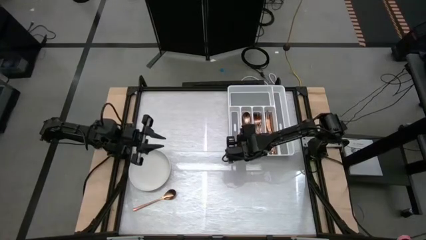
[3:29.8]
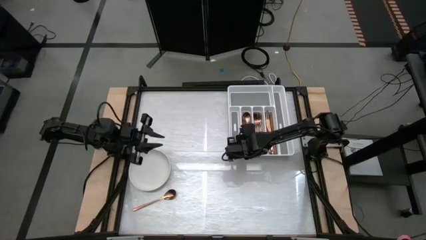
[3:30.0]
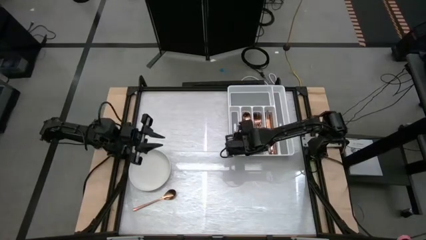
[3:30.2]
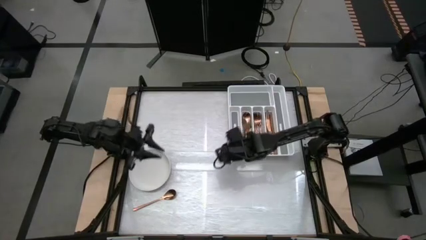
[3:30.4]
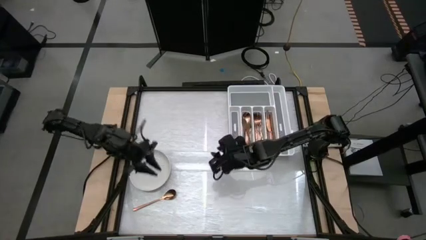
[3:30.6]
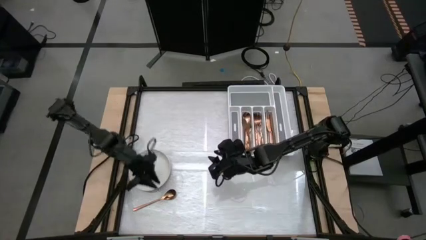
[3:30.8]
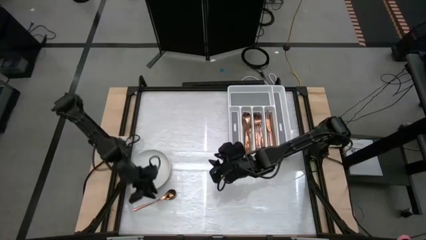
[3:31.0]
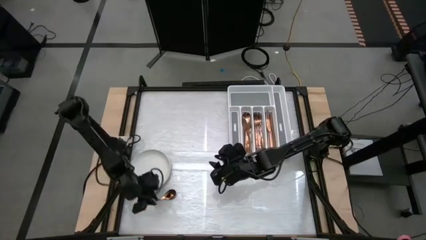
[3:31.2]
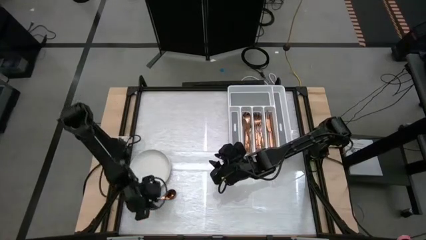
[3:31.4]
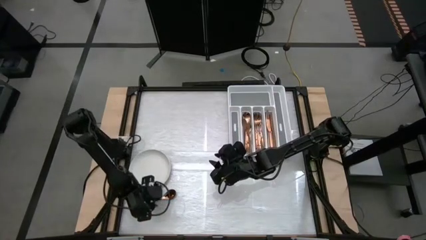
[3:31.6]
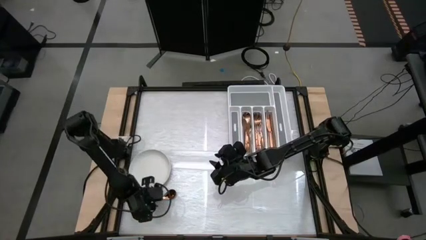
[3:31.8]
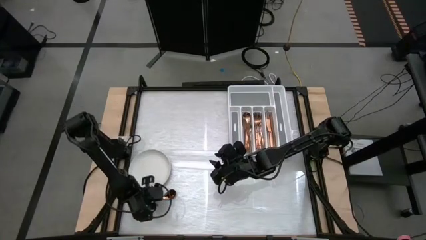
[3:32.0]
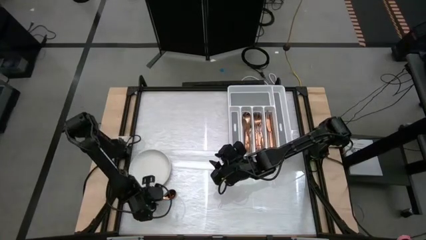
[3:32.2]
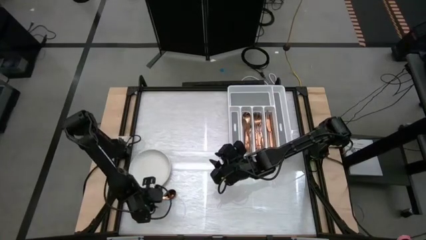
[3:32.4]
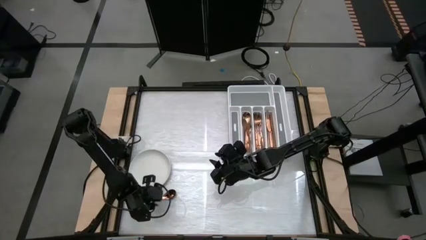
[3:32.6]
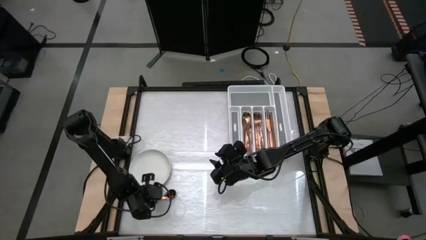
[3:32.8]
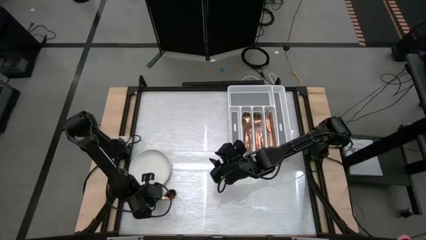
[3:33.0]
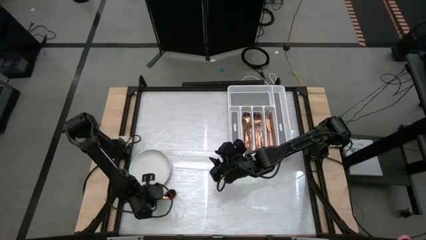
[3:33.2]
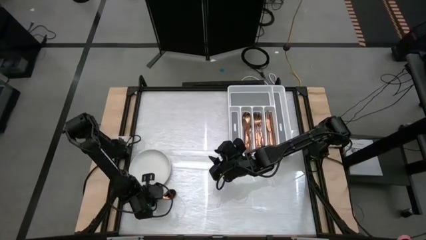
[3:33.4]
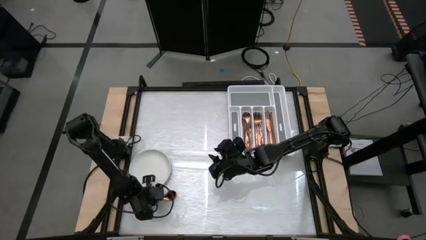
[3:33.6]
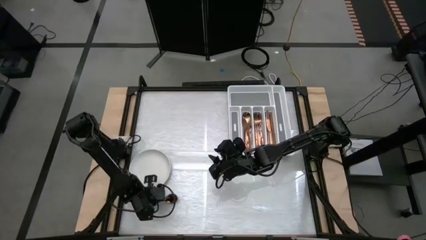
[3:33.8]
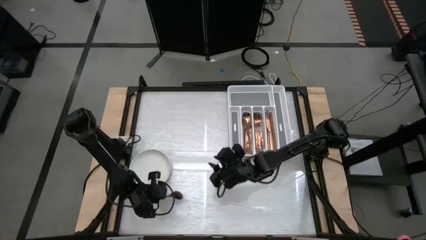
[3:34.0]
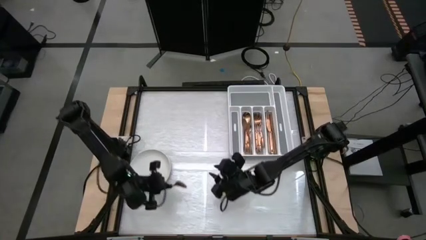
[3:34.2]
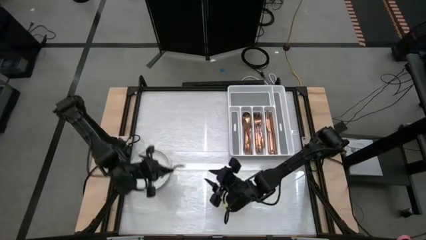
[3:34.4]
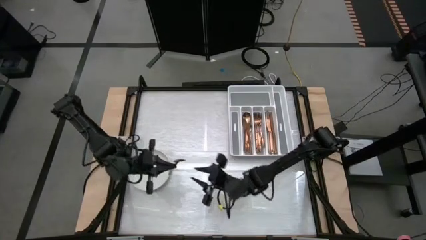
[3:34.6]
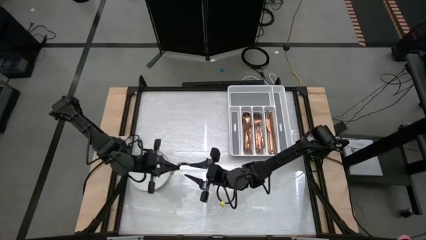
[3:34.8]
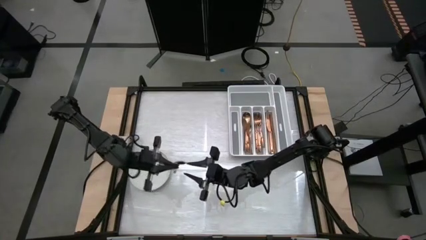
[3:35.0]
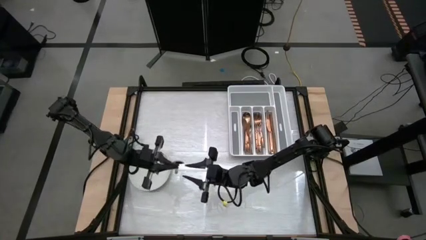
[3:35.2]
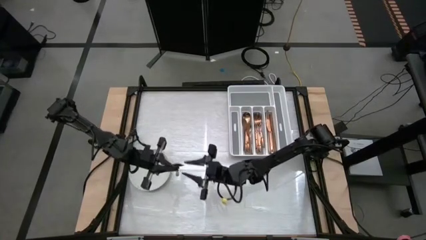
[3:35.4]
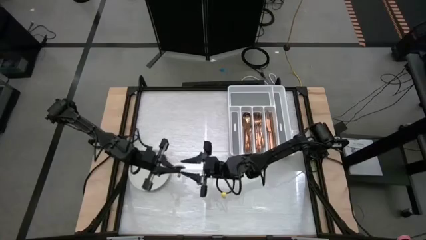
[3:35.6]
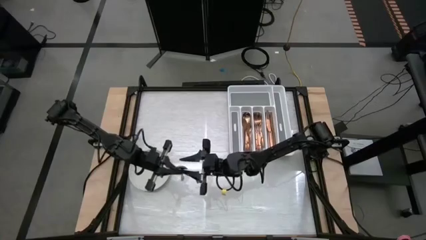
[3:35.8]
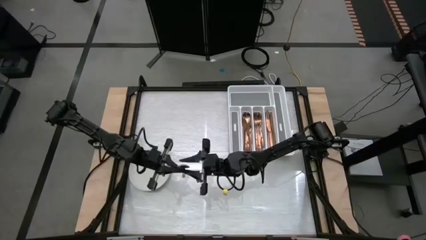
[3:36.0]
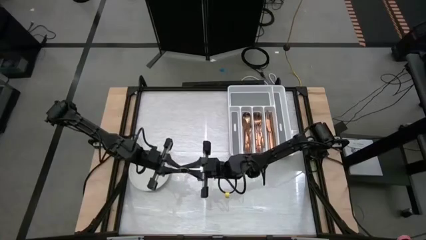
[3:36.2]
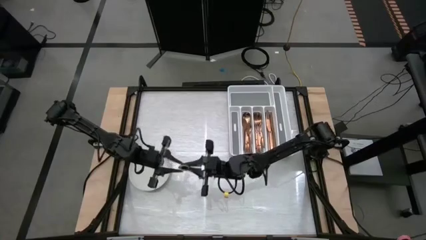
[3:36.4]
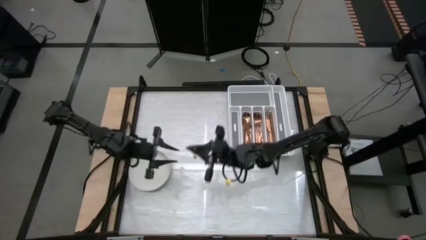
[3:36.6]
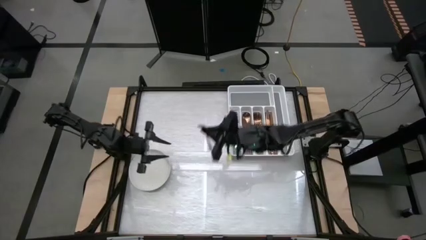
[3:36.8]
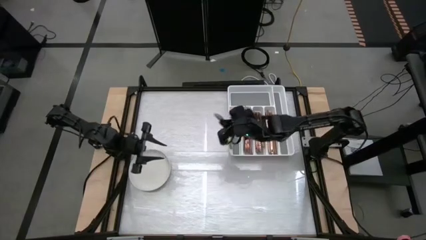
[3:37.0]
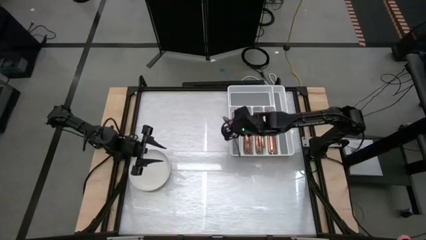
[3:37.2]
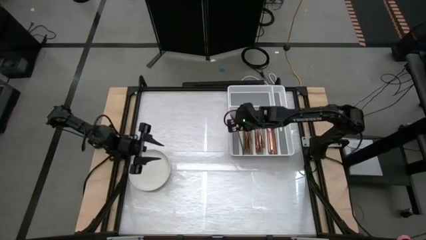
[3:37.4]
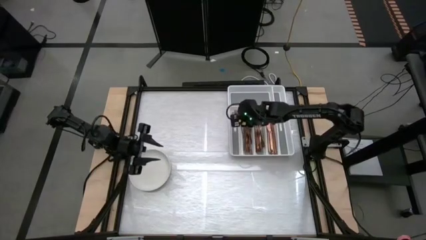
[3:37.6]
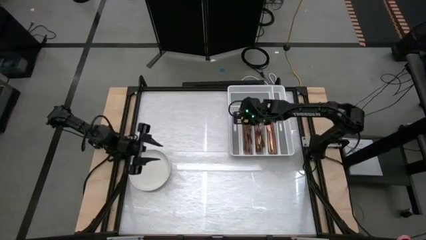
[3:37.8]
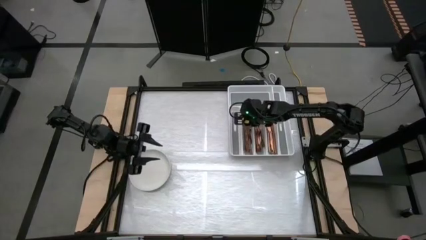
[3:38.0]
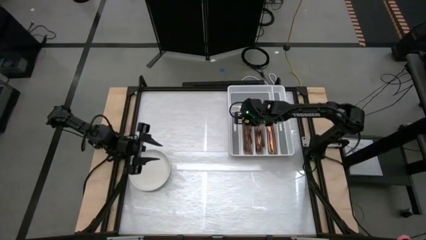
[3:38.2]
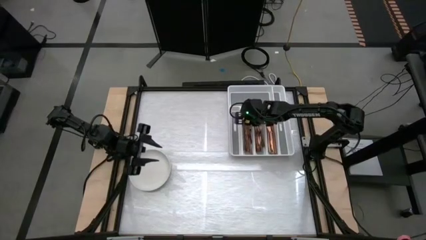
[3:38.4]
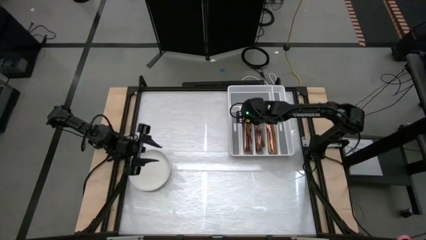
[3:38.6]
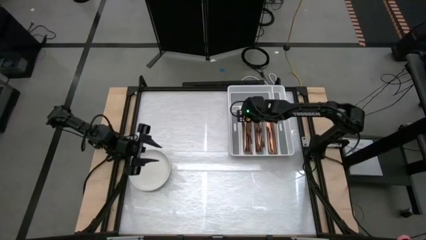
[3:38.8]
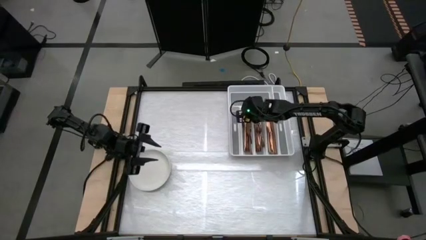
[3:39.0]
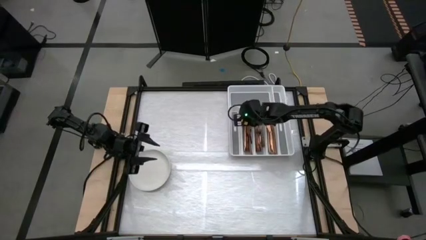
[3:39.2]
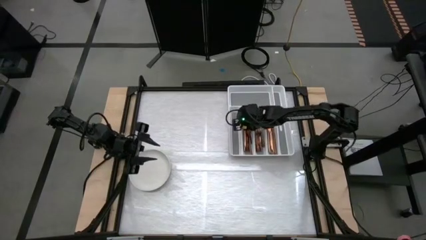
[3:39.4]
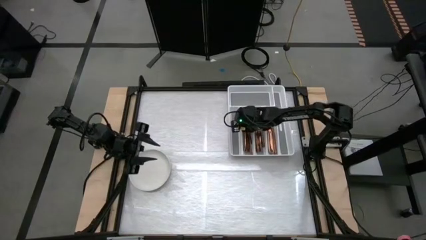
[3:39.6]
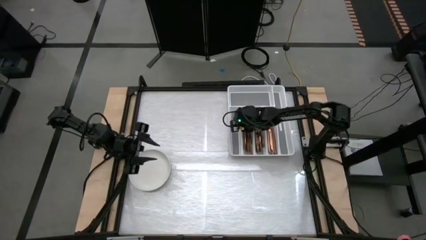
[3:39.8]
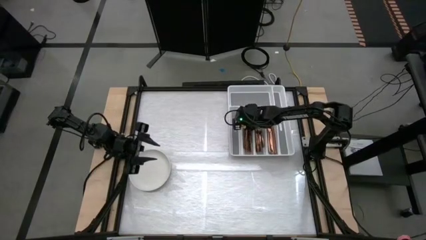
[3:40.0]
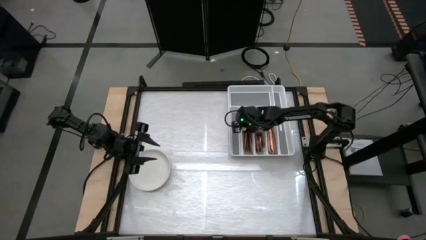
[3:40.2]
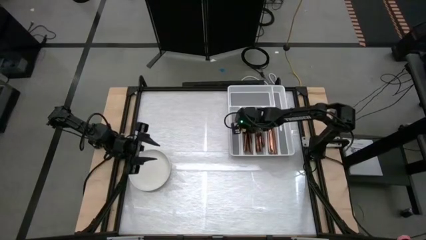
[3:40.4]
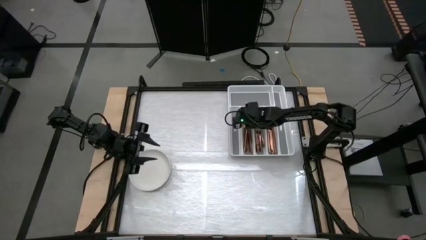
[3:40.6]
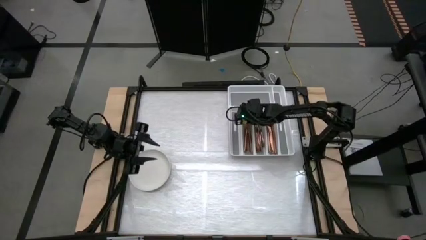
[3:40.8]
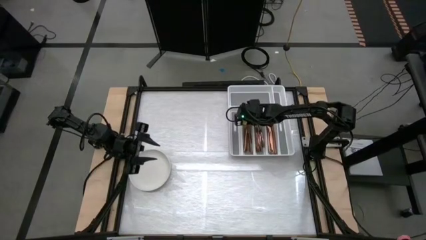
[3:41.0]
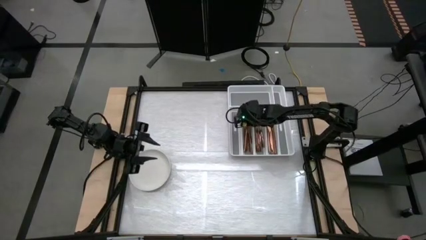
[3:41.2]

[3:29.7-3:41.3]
Task: Sort silverware
Put the bronze spoon into the silverware tray

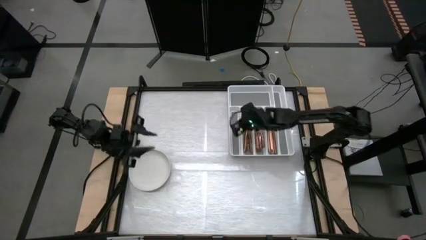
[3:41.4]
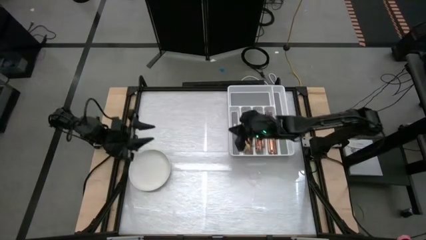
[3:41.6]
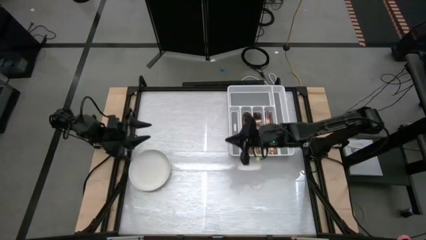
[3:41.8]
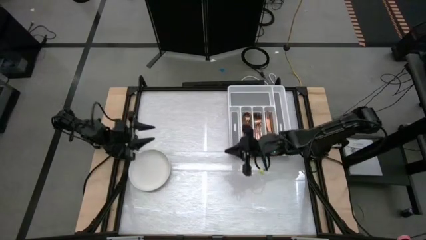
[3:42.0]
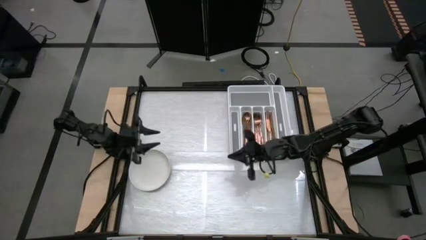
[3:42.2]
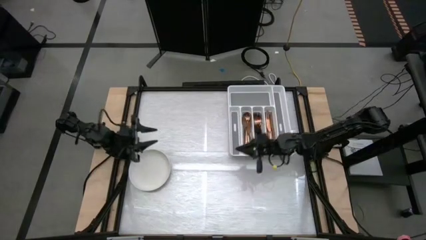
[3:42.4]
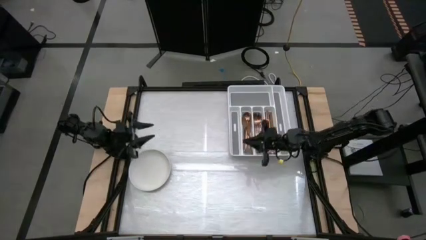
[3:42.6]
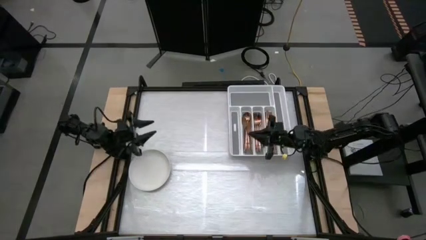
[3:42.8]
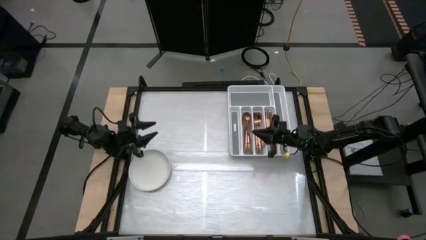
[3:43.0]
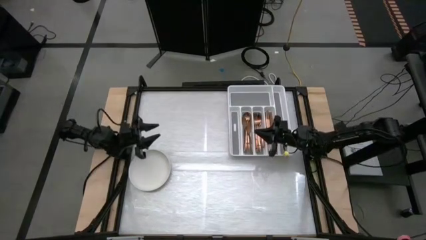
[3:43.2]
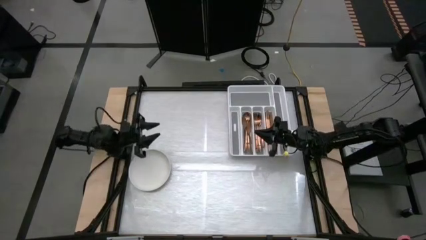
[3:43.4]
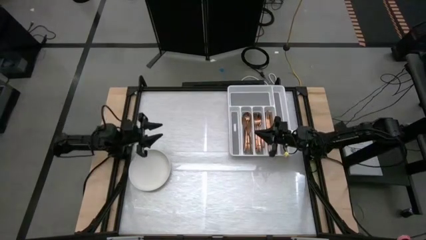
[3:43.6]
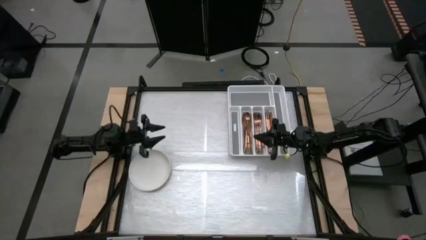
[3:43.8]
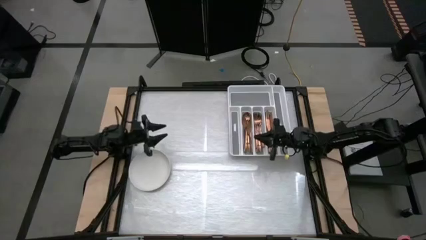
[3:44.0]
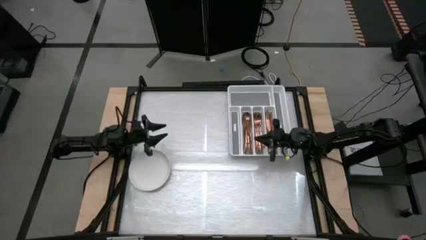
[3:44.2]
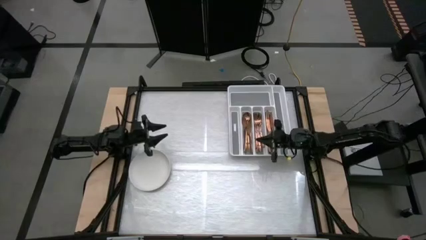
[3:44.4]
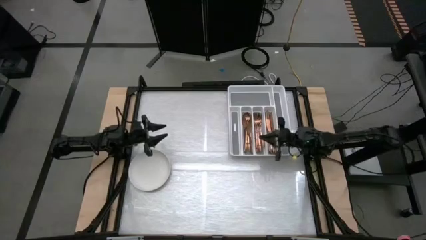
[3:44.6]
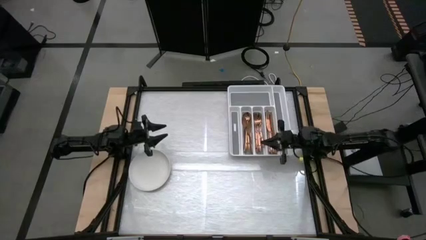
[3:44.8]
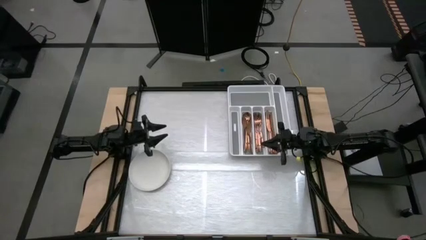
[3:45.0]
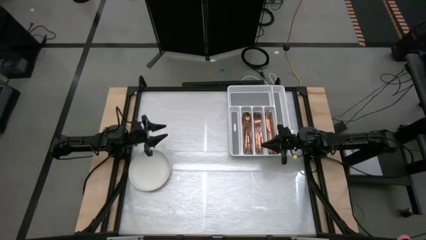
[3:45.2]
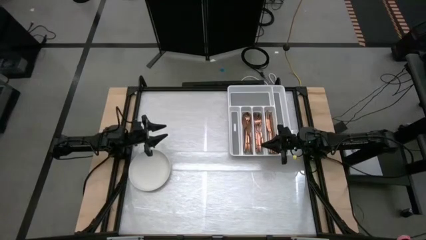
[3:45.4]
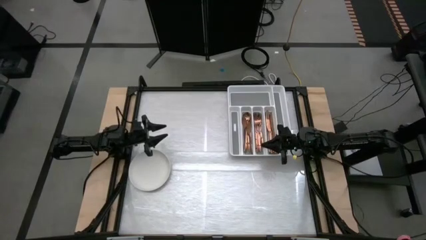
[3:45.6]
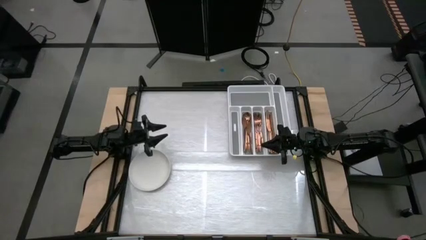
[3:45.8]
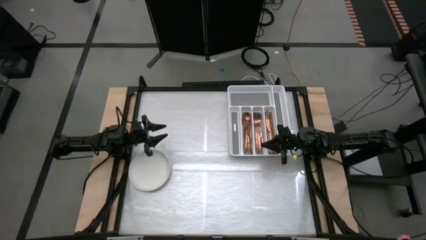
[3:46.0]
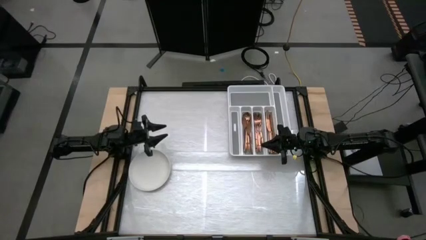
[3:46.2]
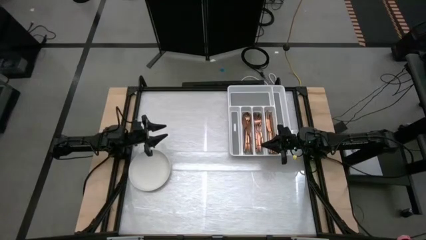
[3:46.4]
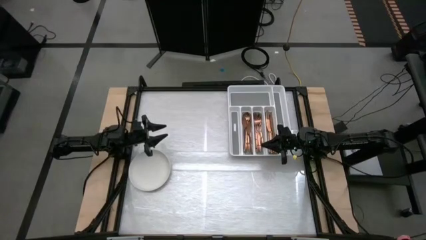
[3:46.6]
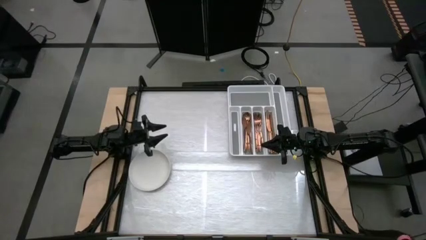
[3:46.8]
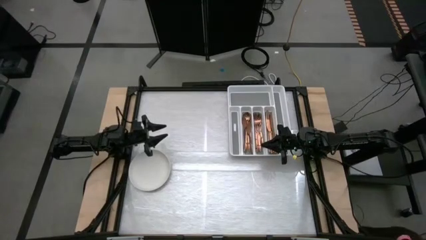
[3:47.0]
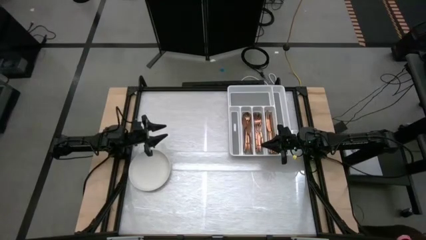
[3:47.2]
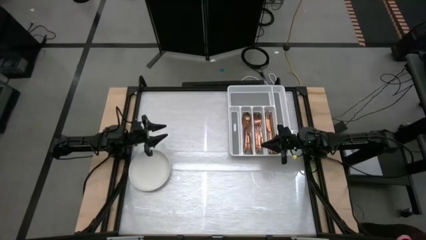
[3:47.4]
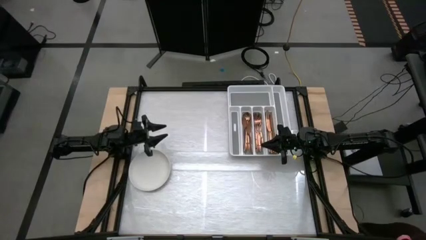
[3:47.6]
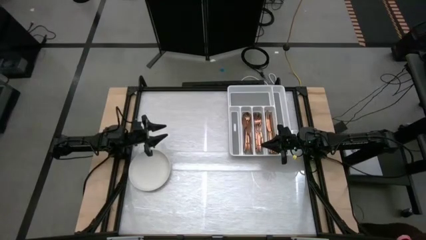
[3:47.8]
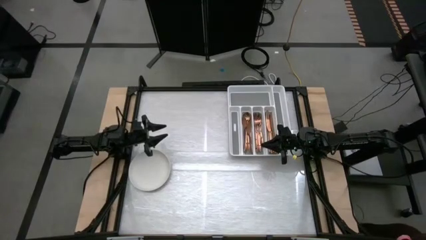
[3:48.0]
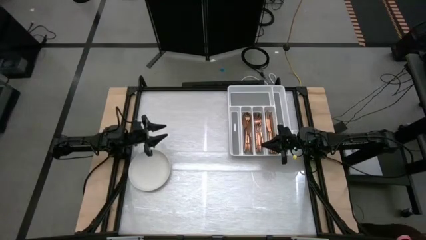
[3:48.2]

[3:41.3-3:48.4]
Return to Home Position
